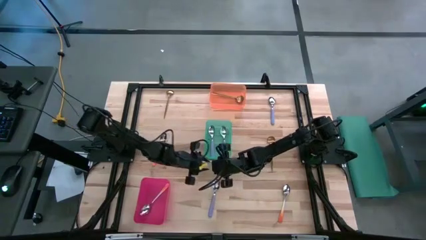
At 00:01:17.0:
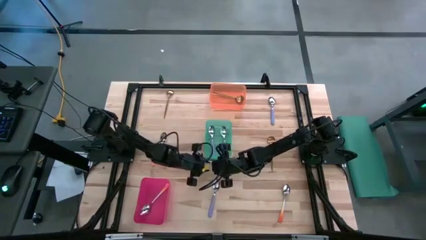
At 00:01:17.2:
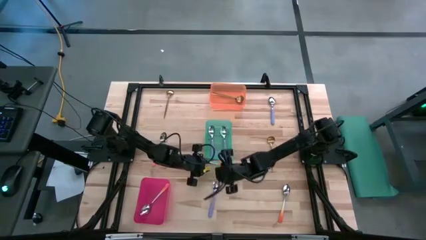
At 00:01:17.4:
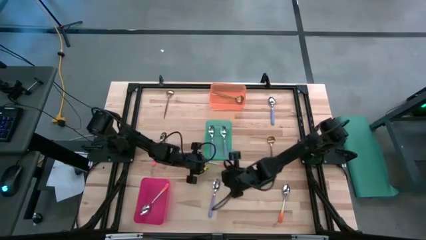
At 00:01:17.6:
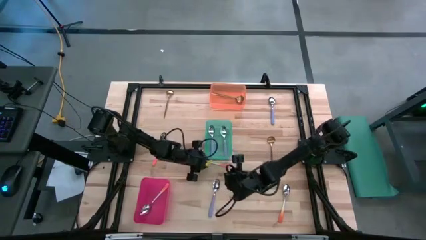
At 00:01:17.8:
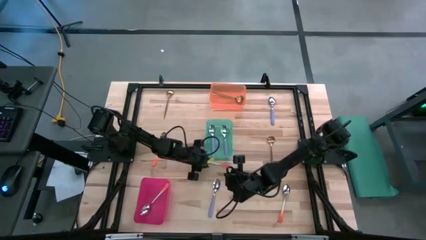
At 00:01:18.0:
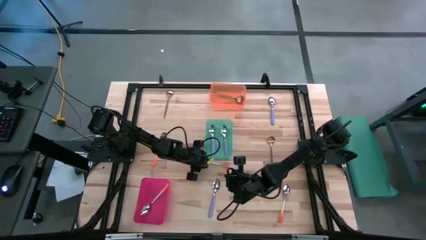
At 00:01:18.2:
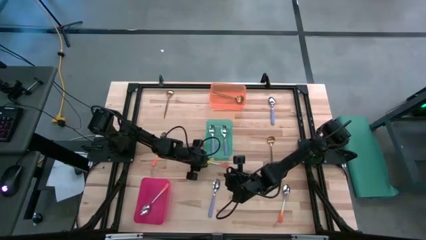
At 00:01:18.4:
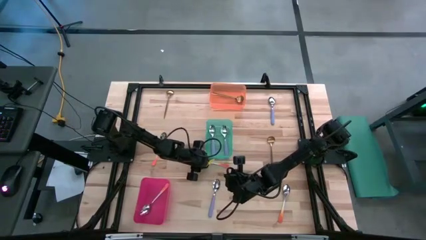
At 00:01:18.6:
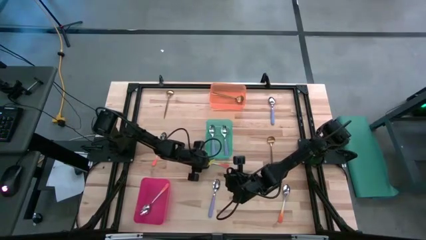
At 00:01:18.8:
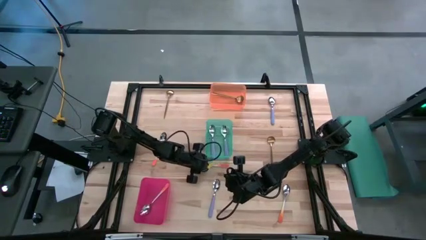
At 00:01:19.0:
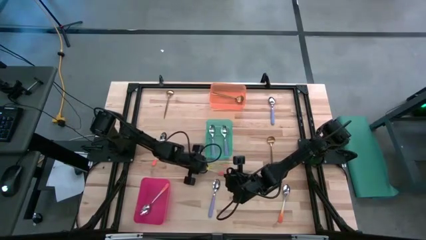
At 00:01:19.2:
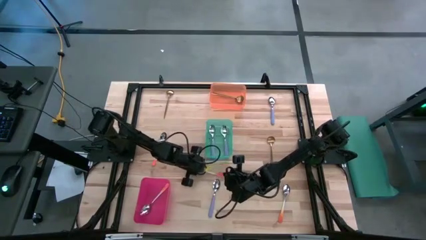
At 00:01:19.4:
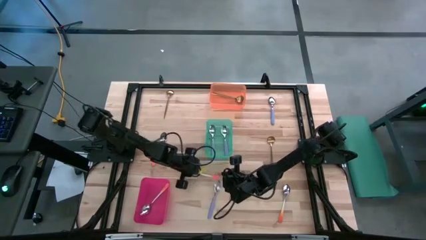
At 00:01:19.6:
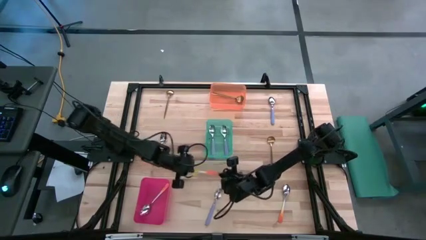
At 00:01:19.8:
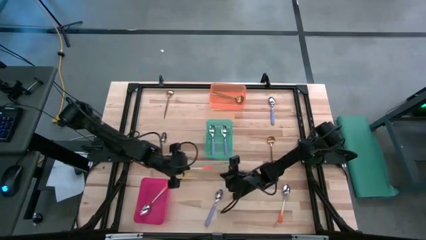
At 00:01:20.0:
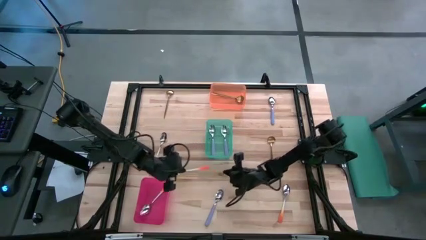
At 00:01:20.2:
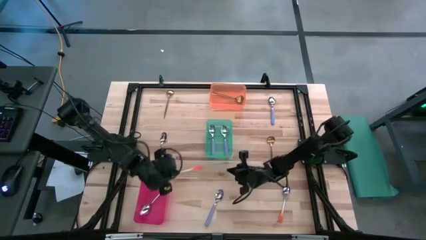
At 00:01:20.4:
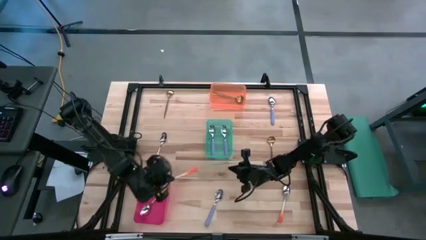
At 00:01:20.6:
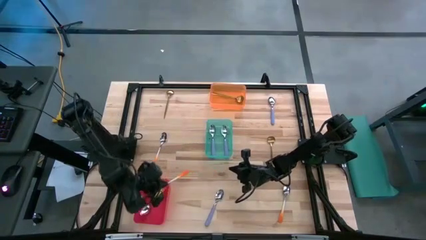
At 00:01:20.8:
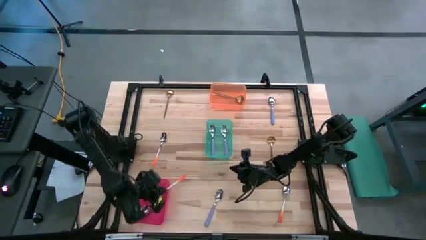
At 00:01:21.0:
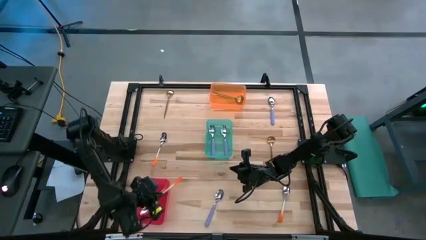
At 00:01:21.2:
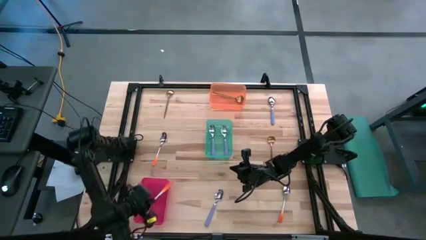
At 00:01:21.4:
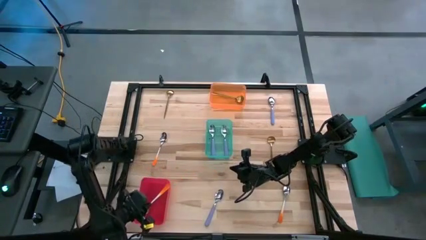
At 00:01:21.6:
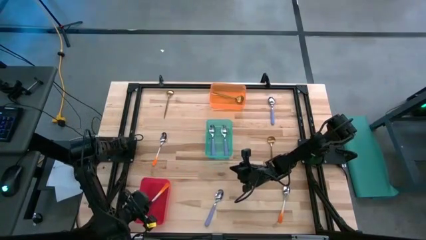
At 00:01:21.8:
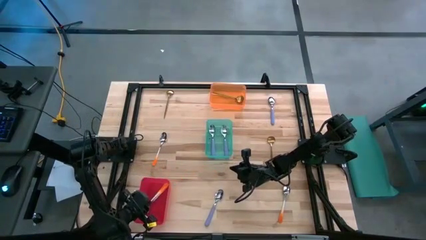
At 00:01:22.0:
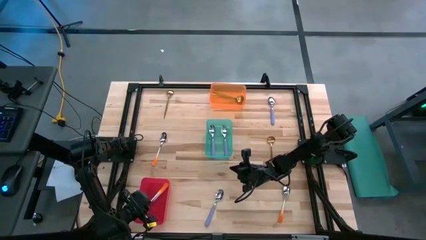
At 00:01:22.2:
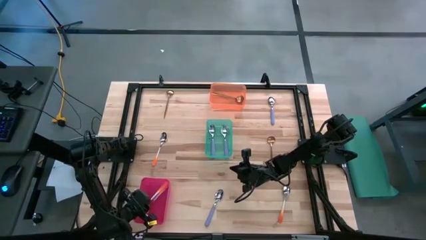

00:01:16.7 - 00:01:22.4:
Task: Sort silverware by color (type)
Put the orange spoon into the red bin

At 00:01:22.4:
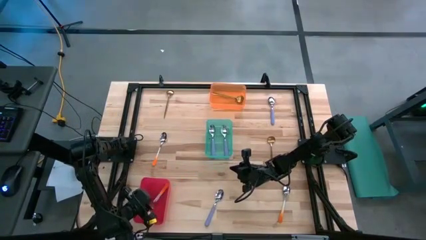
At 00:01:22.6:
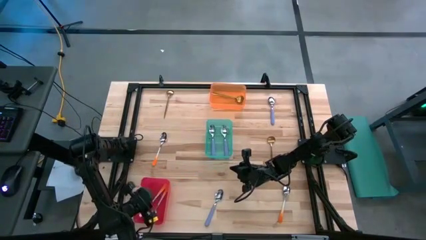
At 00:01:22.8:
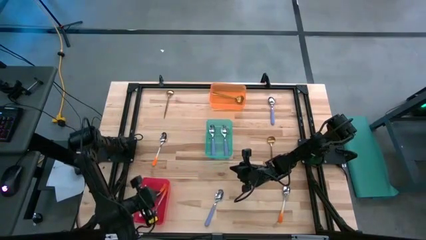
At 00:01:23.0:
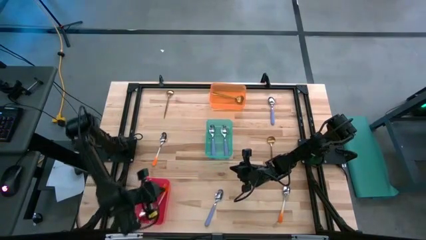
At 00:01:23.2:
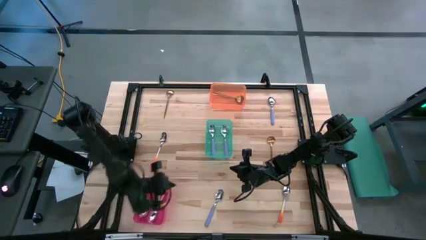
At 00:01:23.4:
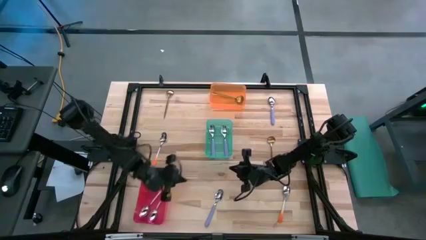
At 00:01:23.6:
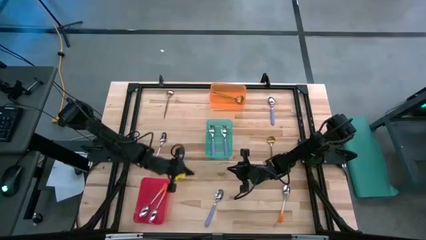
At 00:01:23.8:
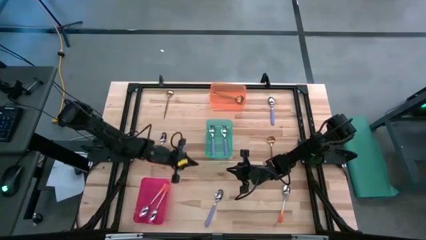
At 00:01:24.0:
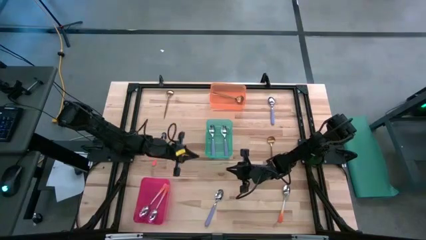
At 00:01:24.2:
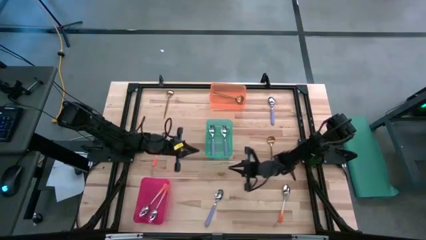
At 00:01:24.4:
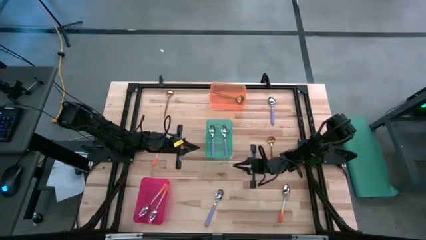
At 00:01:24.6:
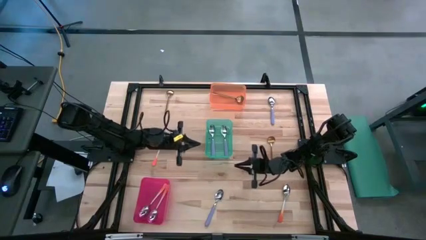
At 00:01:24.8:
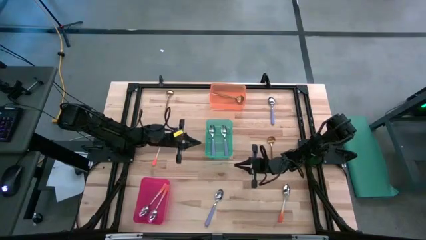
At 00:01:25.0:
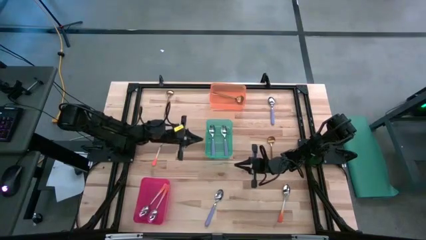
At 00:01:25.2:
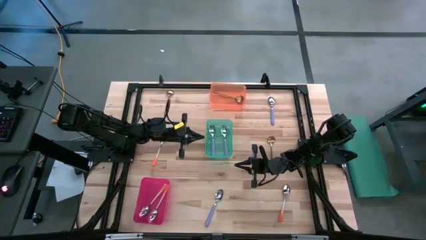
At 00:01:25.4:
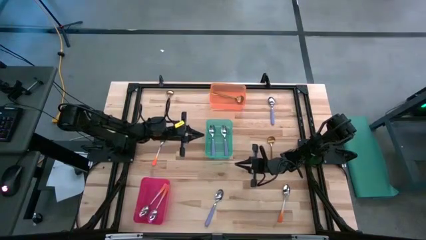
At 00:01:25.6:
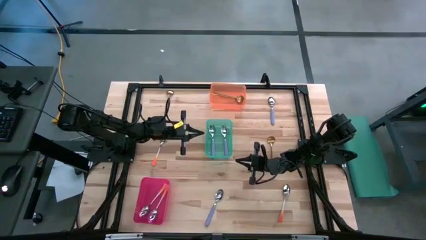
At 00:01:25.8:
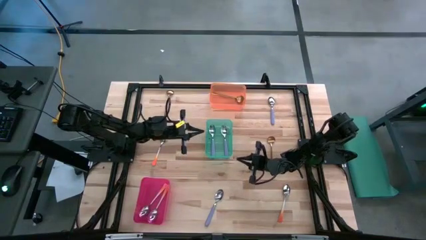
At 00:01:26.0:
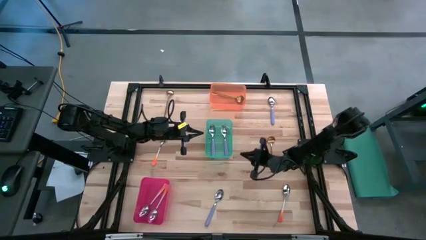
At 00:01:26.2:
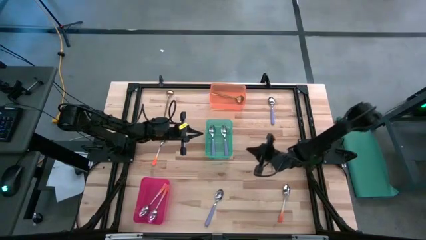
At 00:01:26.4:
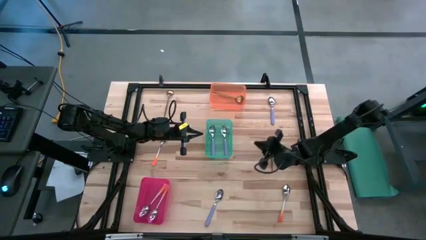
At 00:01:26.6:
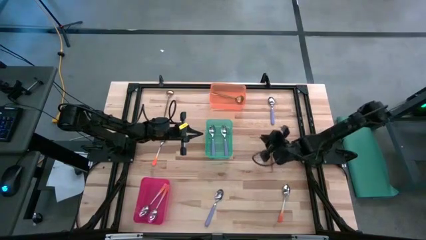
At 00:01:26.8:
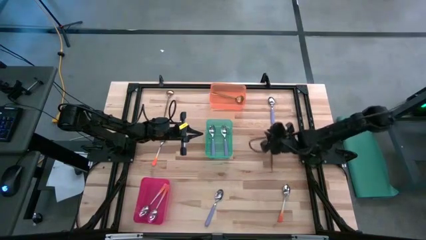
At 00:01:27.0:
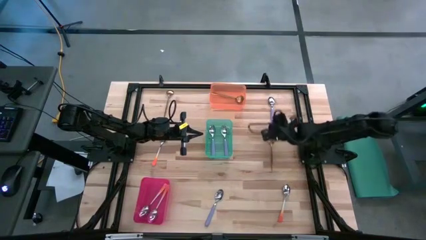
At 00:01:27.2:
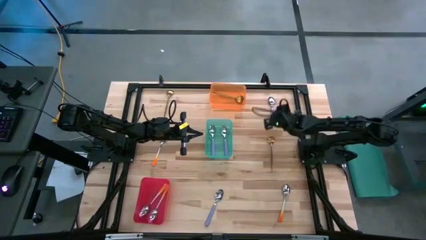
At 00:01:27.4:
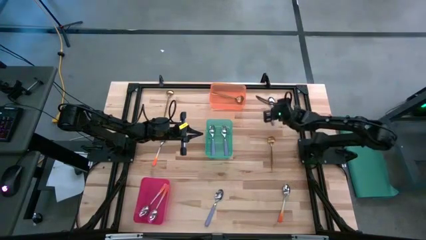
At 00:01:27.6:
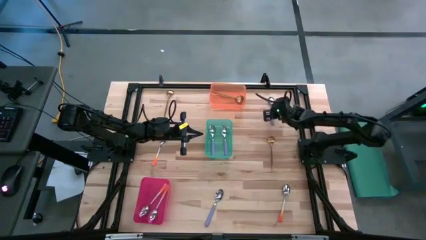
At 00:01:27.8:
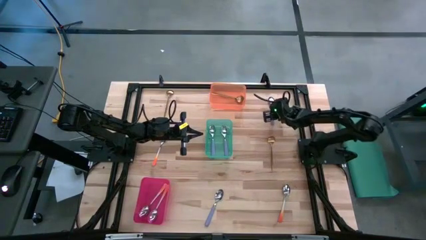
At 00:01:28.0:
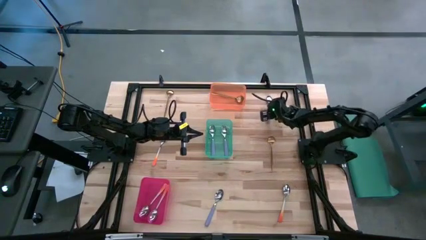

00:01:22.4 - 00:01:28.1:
Put the purple spoon into the green bin

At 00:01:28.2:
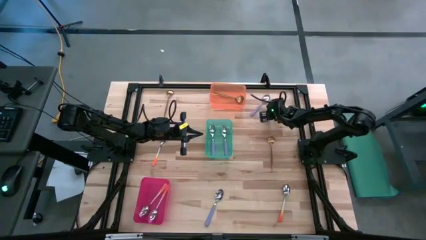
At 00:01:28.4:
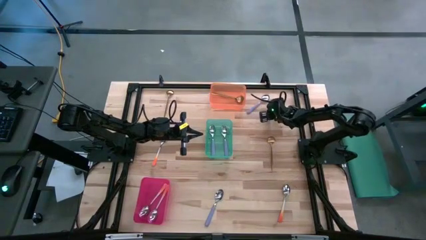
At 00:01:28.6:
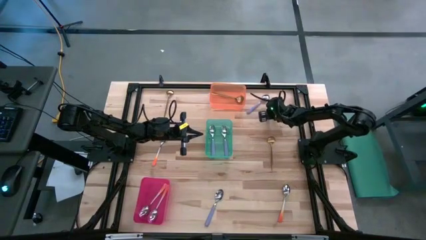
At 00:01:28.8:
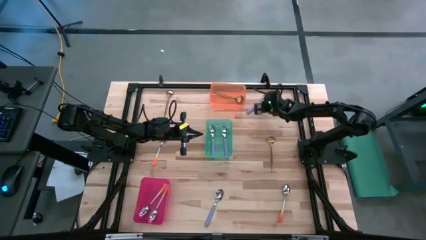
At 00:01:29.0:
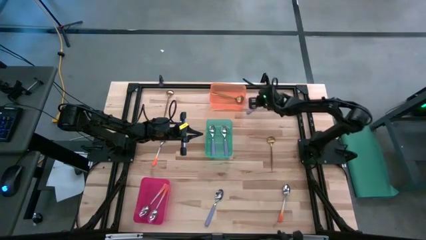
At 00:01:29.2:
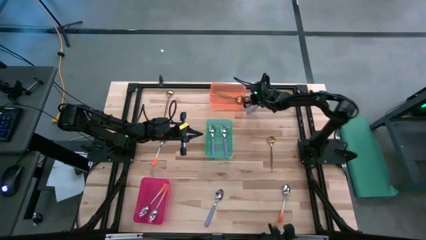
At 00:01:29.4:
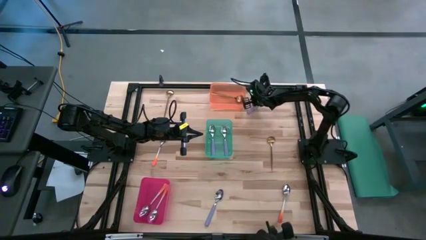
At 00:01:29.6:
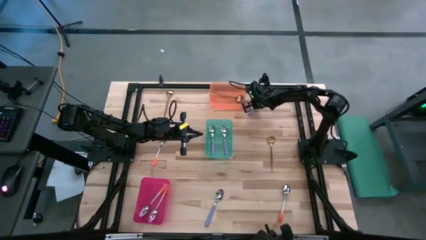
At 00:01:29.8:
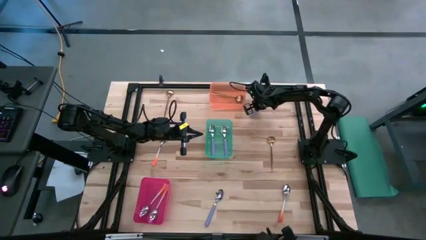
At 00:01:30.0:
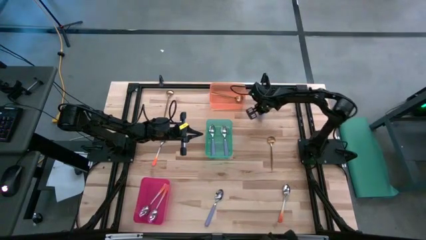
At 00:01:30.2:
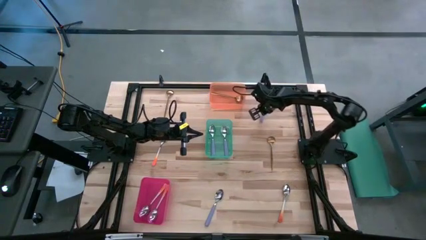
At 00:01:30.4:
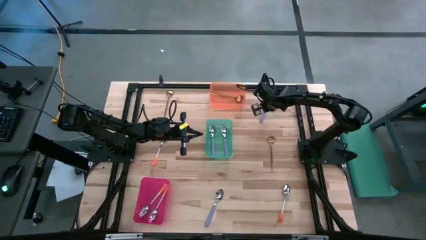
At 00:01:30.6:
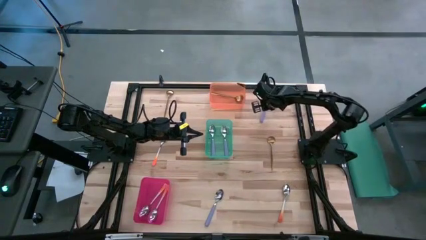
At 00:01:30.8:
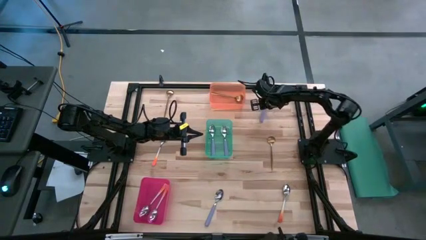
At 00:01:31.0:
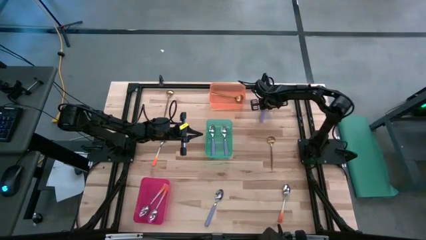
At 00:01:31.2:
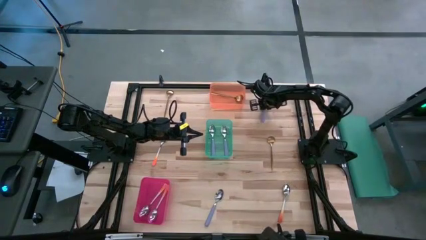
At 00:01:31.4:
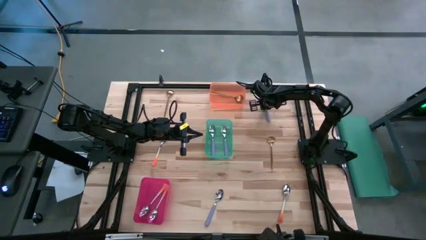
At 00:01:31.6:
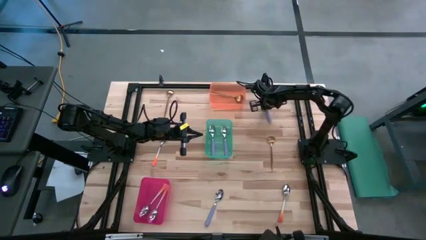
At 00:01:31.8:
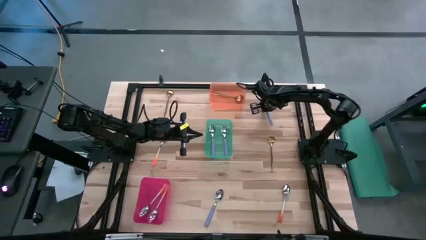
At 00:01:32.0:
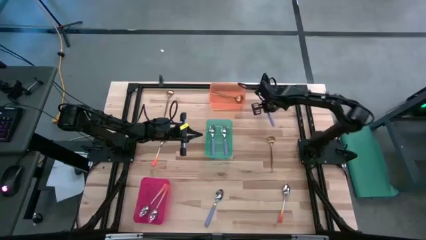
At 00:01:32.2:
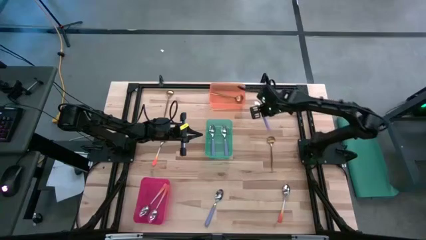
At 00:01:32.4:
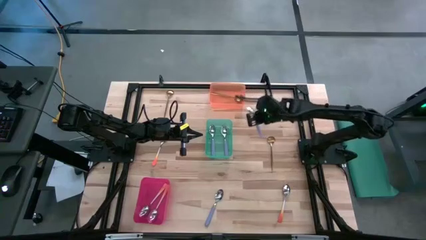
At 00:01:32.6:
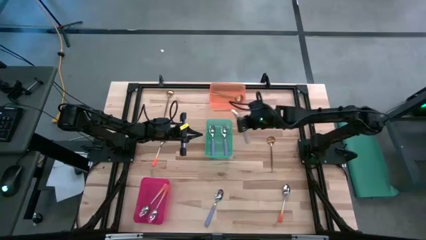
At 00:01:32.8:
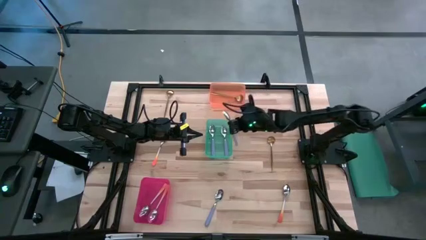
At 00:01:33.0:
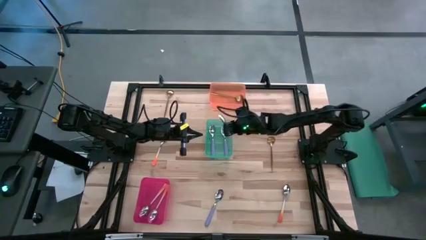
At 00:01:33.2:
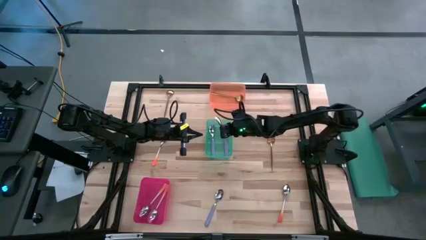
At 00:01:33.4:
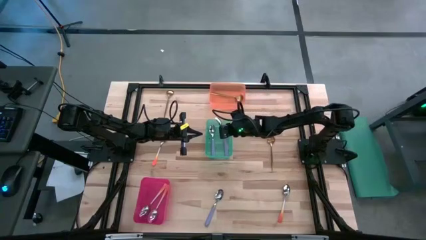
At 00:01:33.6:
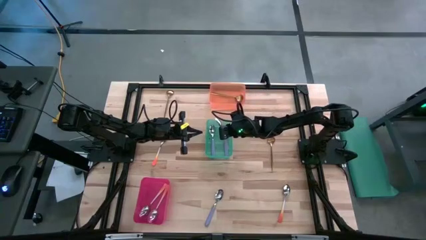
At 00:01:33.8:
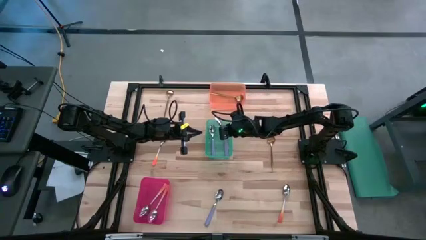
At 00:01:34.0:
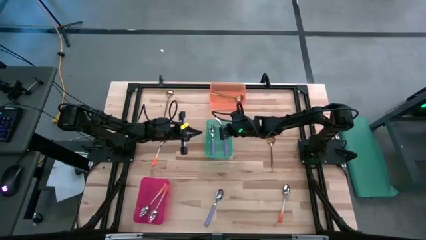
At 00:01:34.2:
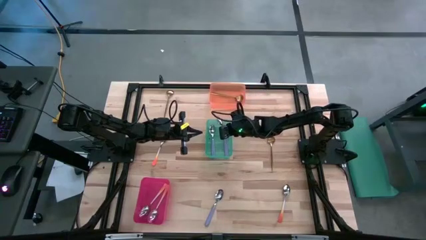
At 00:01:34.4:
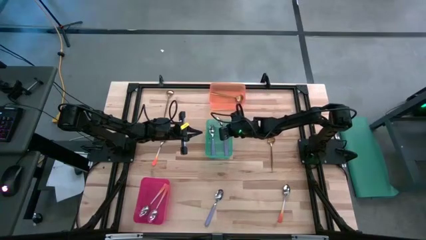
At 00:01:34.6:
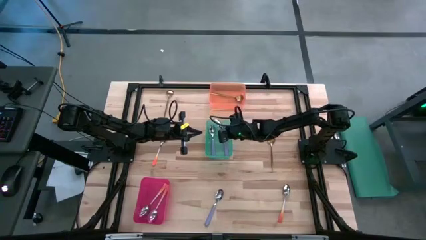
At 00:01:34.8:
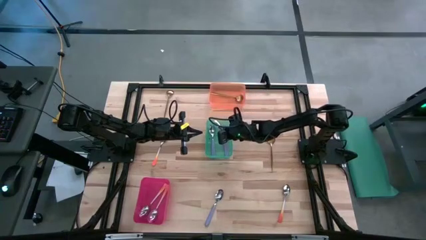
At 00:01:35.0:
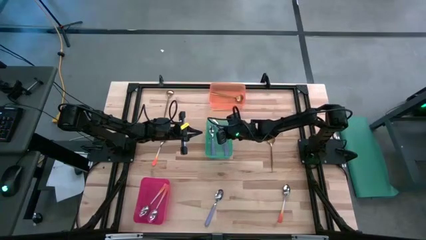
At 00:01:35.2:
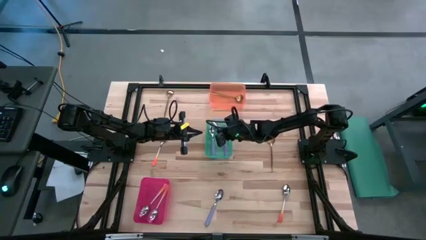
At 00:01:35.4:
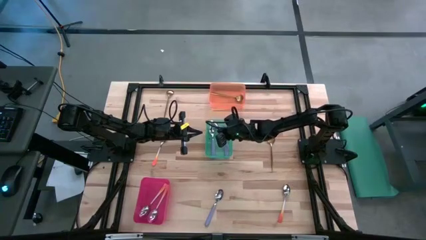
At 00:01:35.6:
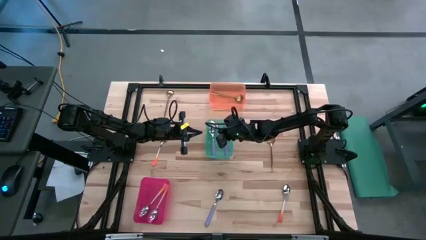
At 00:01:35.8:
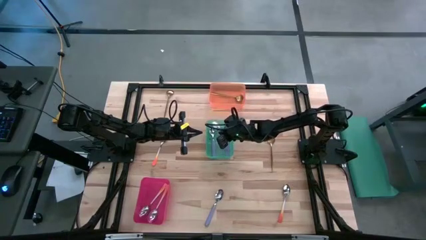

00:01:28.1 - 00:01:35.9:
Put the purple spoon into the green bin
